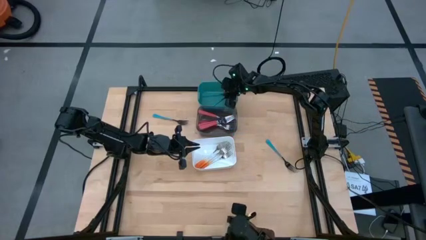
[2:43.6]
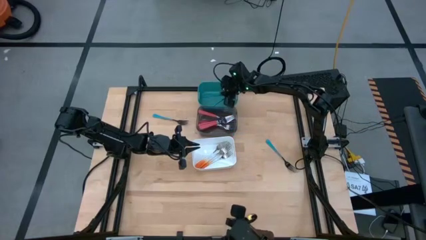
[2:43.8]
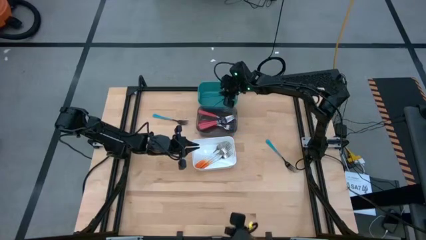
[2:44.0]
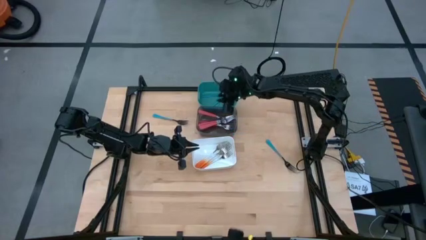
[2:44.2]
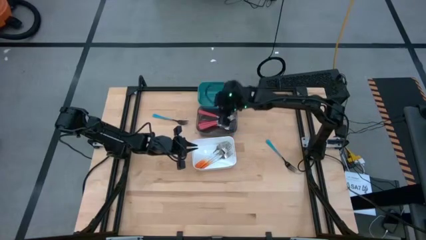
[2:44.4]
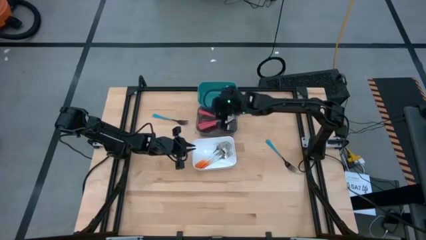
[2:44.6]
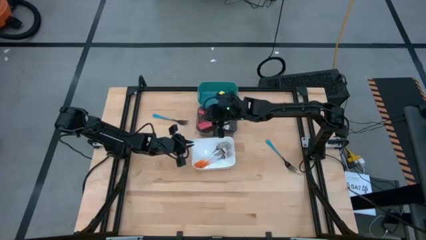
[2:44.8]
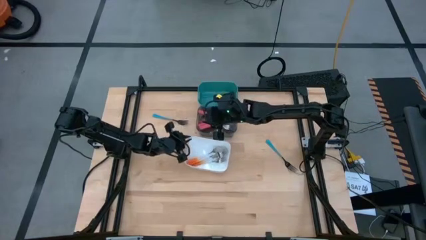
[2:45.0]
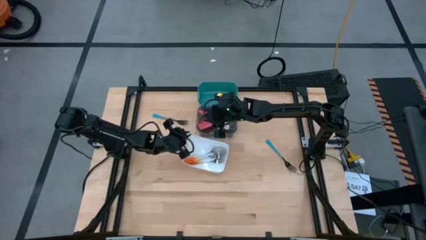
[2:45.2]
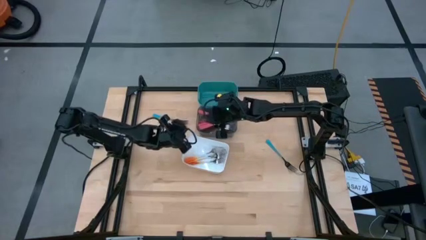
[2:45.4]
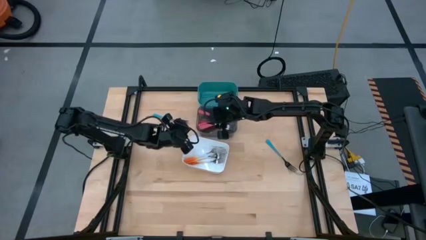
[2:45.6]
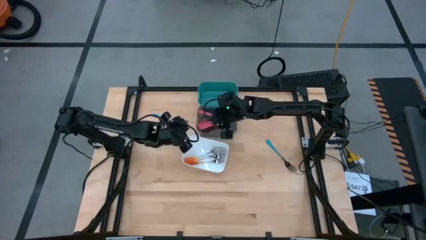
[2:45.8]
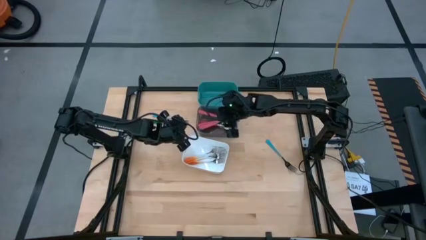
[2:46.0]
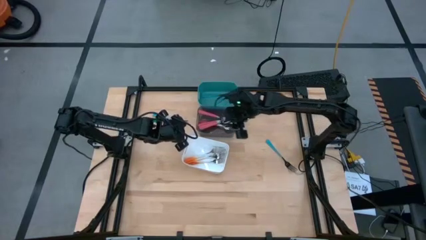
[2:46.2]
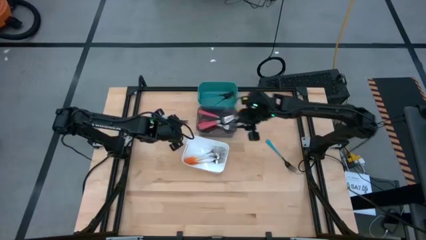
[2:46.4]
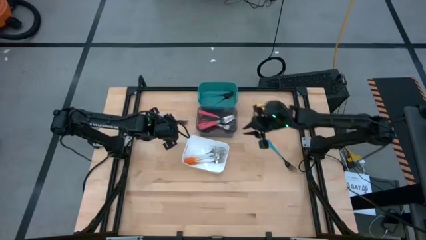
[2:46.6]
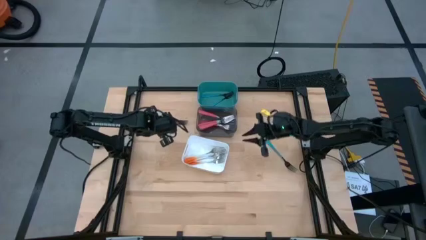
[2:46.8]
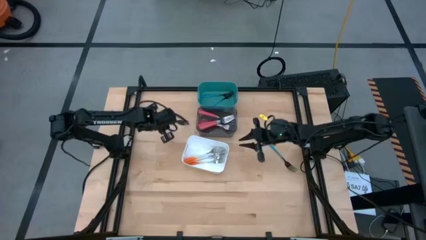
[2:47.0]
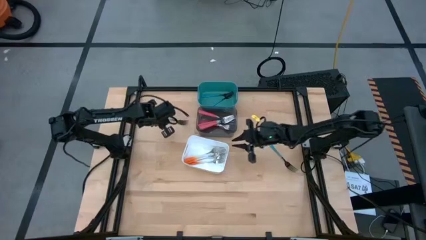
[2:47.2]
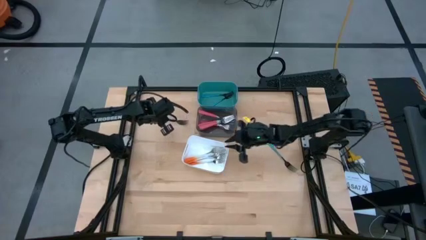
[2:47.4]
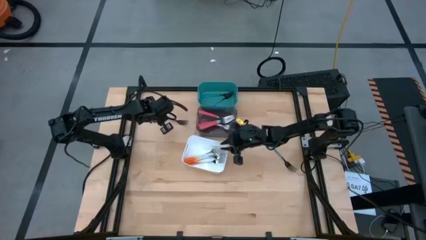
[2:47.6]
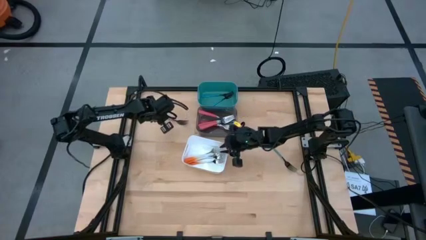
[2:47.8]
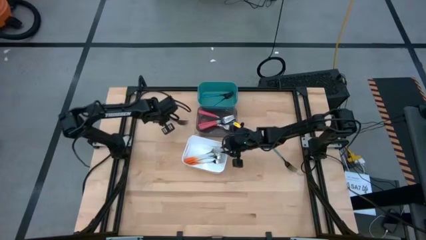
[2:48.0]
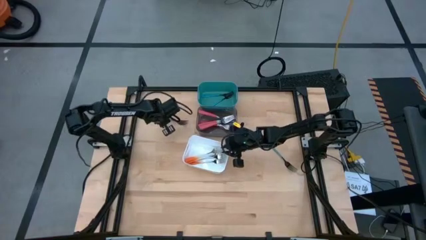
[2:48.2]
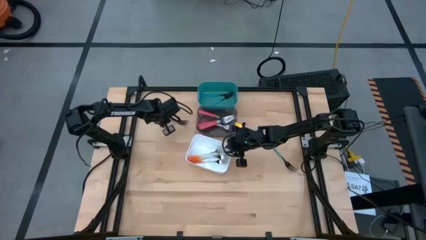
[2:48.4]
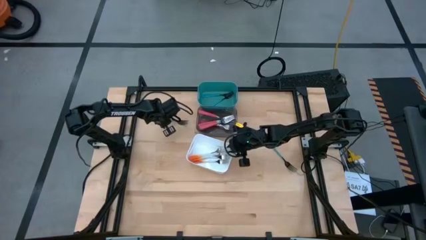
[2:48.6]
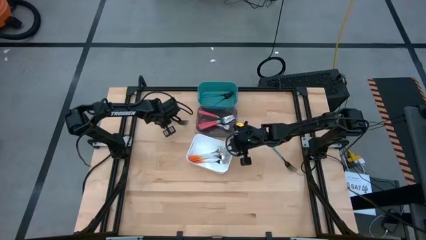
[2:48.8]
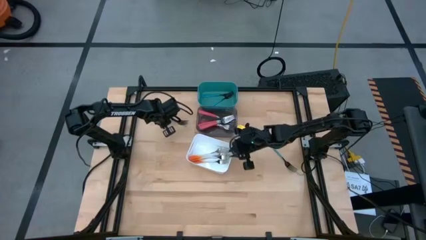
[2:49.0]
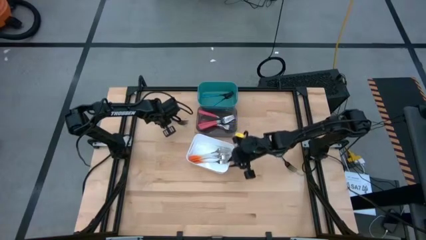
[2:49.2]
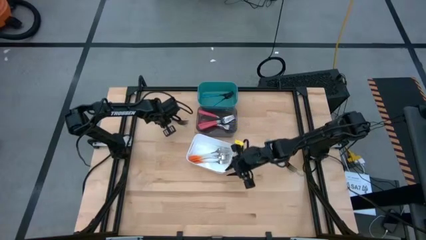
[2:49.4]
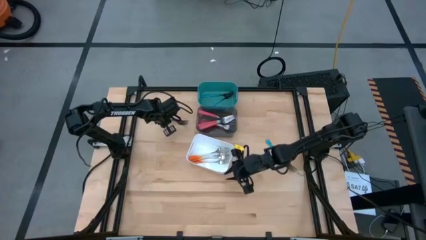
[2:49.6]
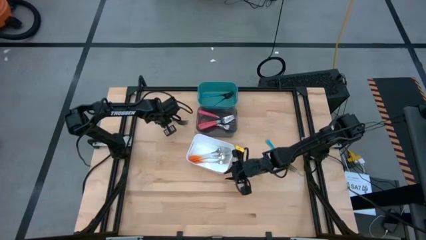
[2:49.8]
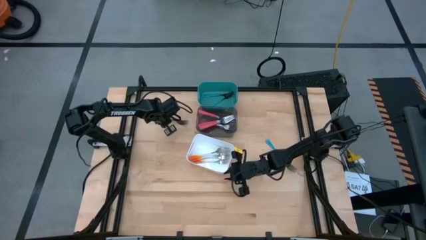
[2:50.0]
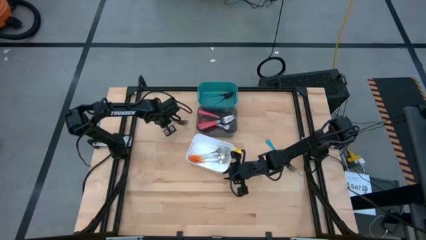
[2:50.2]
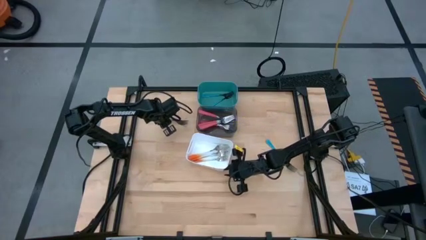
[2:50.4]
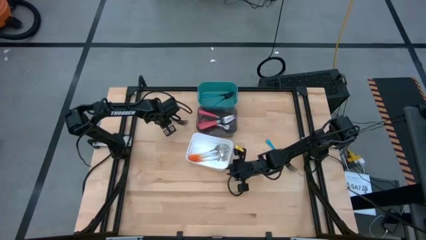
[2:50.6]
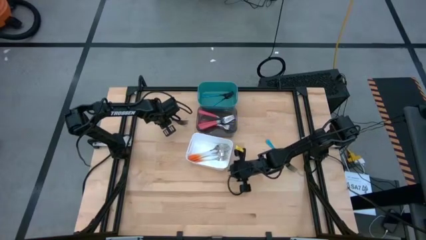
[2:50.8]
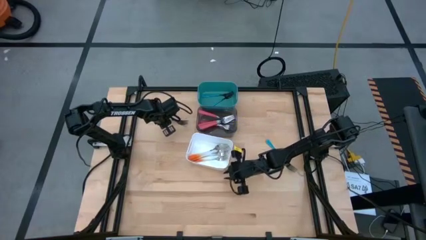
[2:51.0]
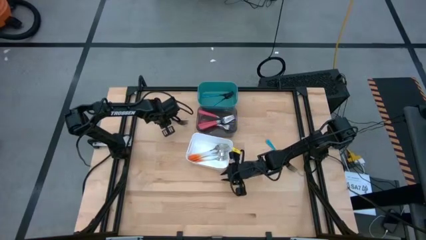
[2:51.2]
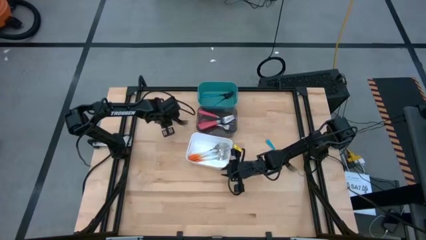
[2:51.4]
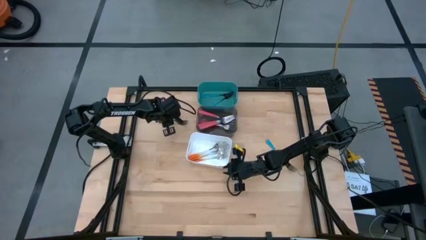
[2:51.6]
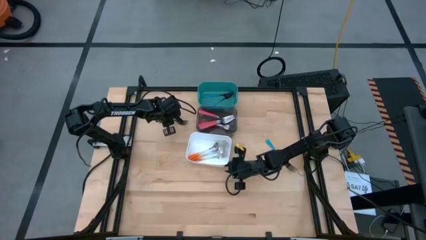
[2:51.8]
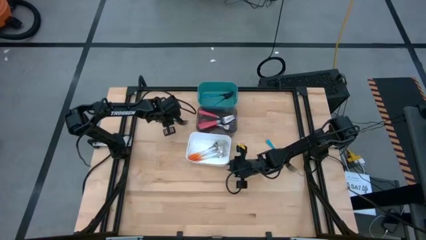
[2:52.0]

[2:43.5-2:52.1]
Task: Sort silverware by color (type)
Adjust the white bin
